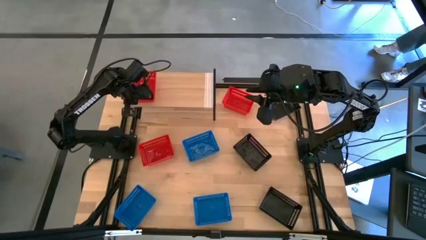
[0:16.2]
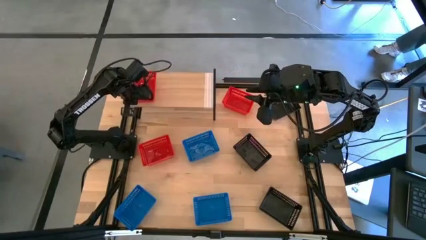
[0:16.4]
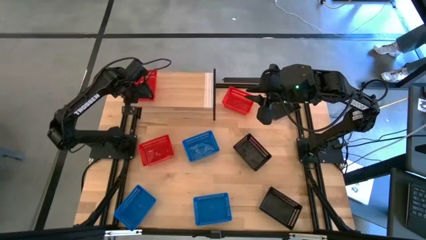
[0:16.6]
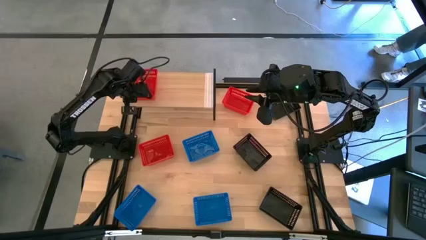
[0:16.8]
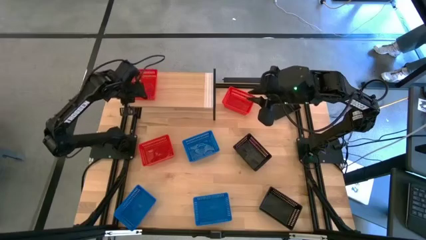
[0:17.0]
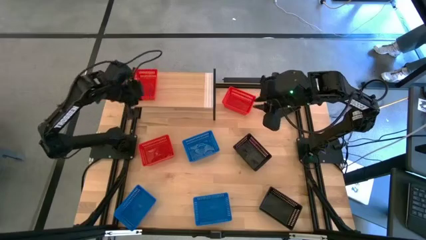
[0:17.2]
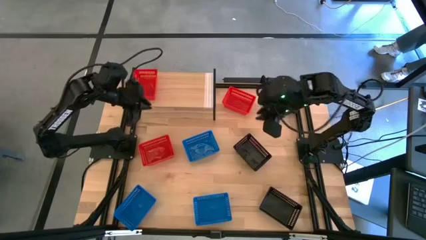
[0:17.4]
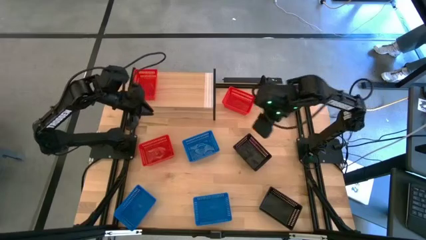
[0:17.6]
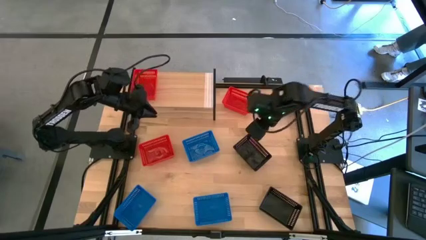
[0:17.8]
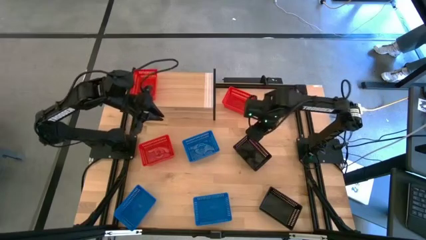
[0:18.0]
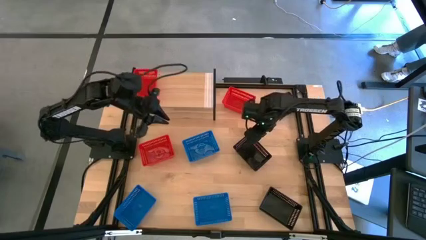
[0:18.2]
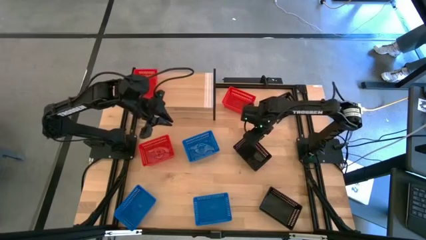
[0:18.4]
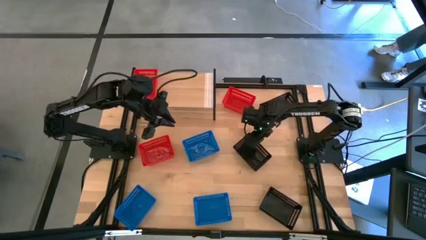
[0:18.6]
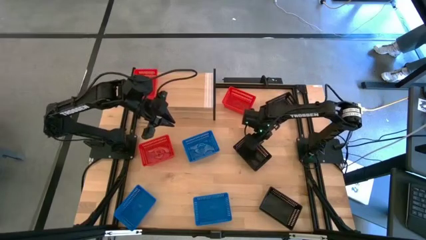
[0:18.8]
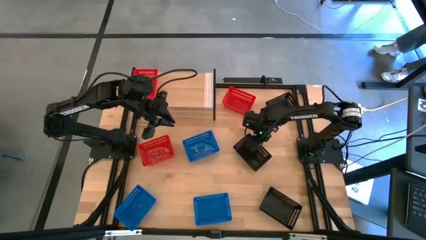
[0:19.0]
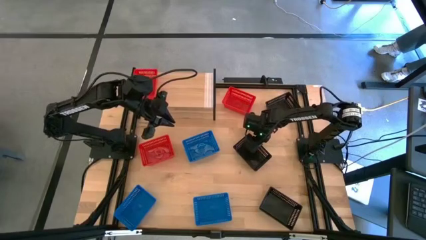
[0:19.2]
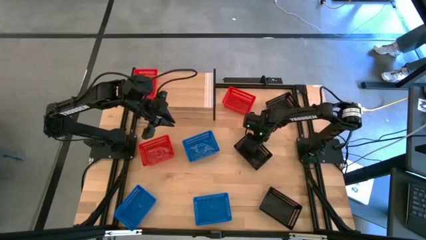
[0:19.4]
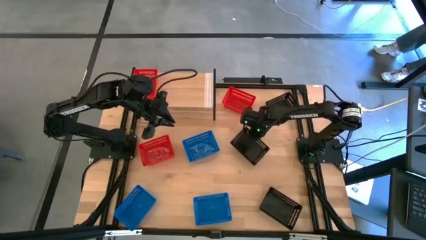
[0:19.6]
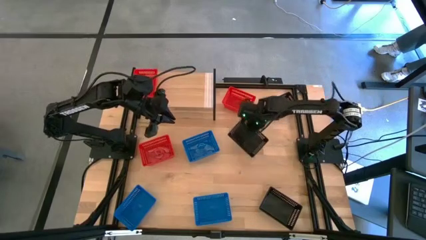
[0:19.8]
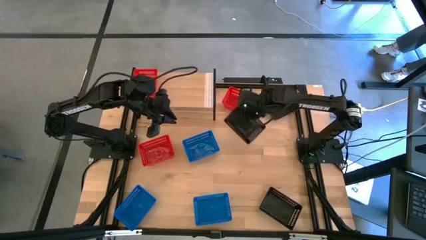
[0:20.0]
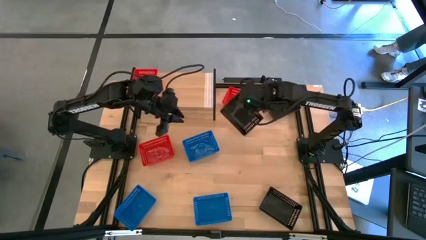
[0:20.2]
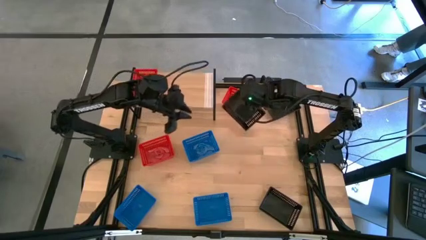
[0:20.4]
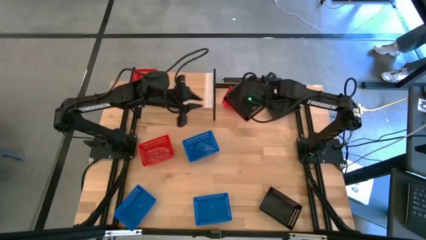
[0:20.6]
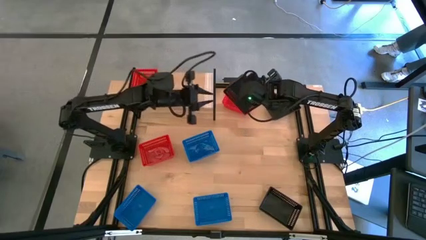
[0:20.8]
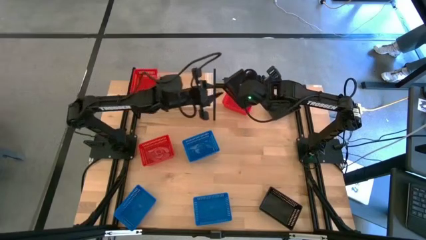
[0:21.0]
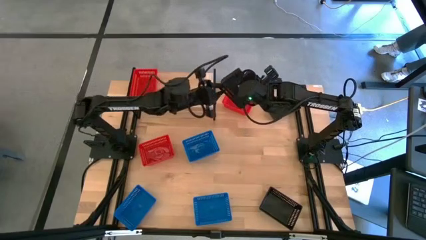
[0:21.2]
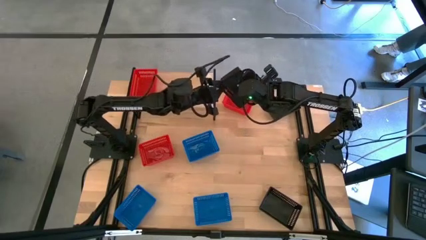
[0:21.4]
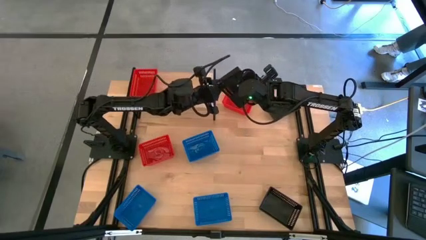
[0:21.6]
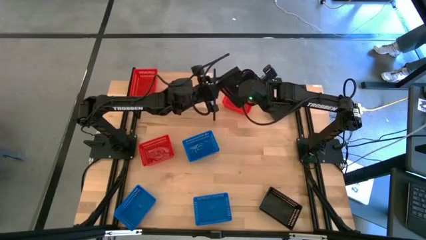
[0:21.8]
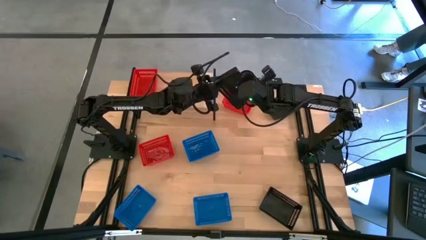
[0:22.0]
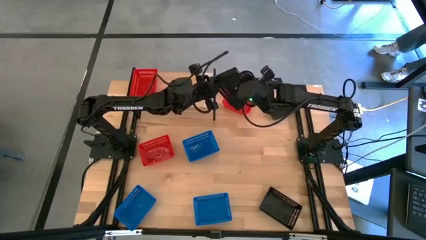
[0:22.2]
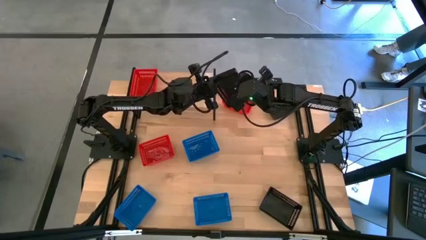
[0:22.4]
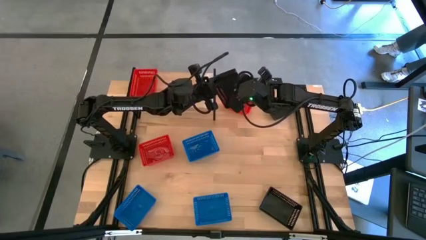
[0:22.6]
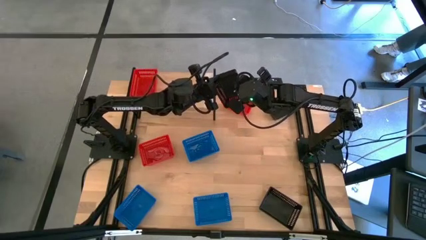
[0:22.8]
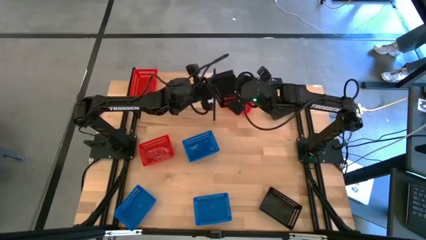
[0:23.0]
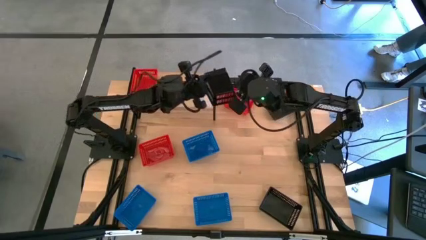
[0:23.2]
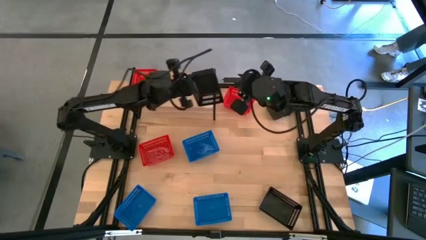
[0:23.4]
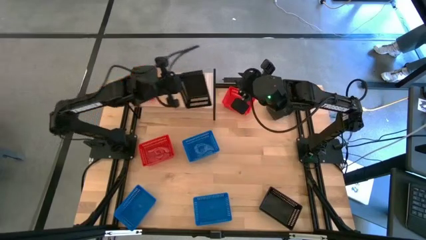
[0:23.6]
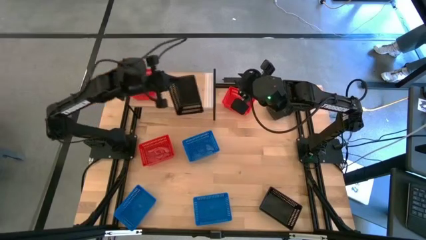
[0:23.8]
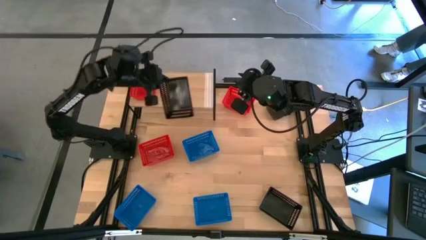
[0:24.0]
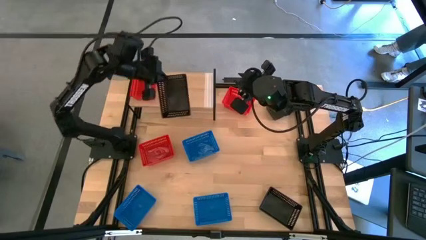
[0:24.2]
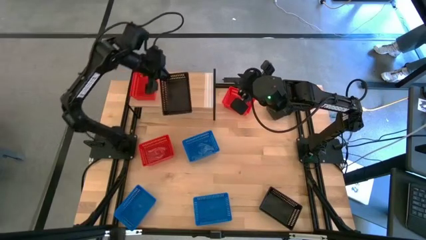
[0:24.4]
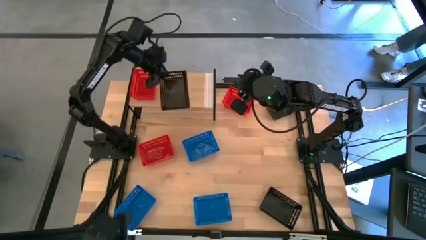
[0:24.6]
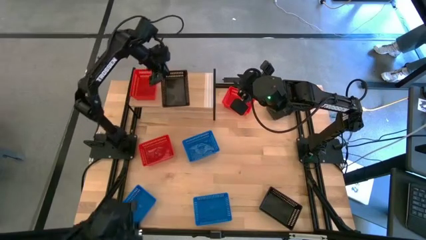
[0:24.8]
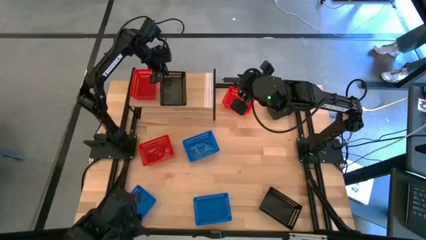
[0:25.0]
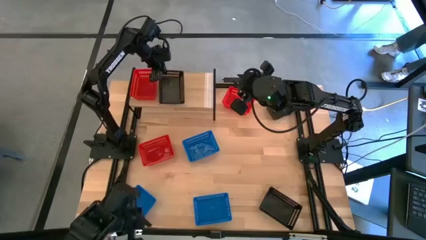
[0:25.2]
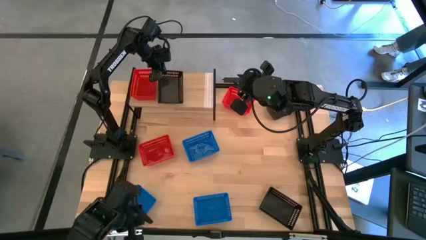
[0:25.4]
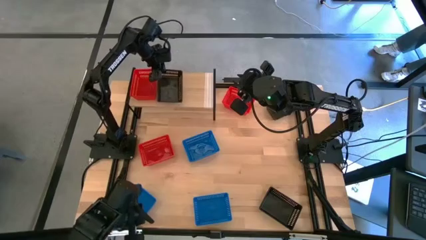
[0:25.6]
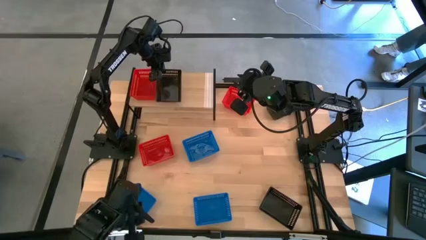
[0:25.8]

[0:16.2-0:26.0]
Task: Stack baskets on shelf by color
Put the middle black bin on the shelf
